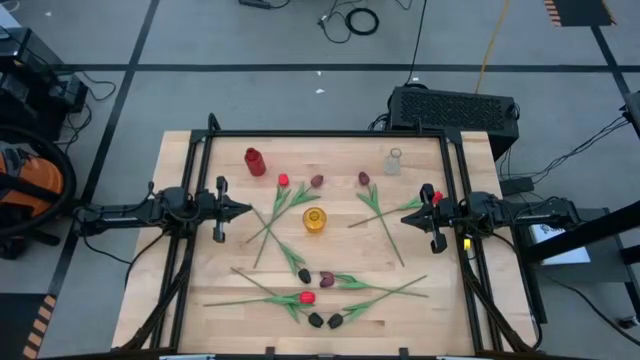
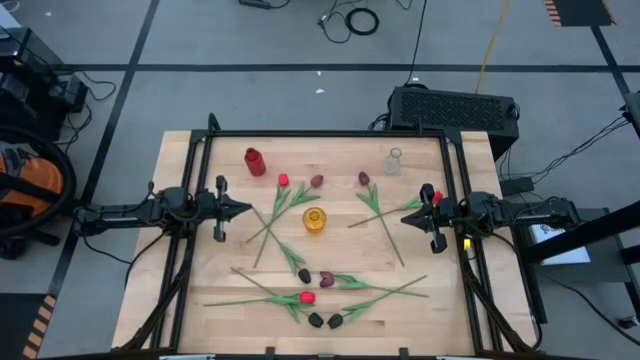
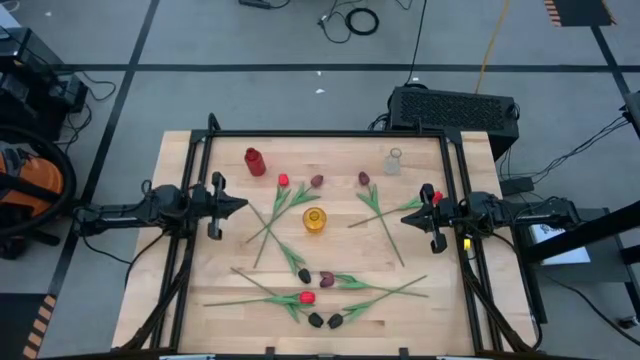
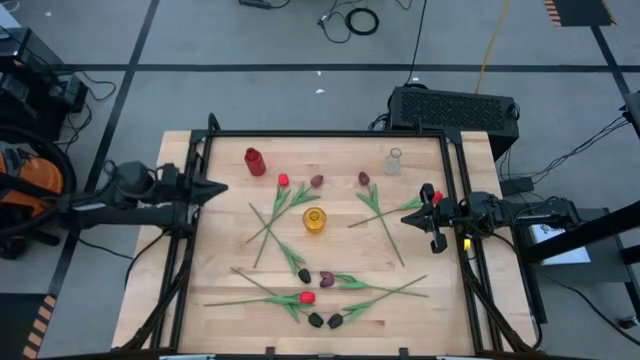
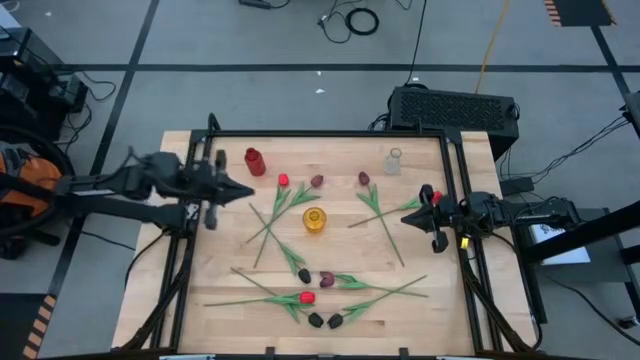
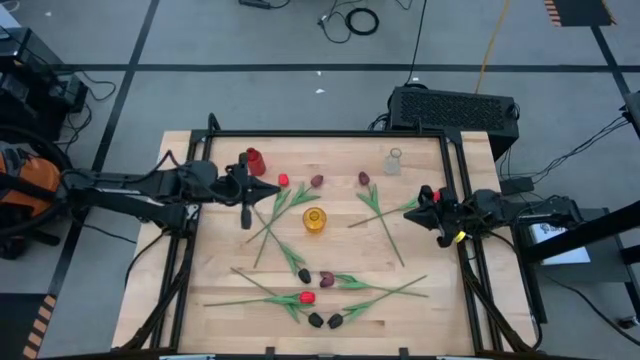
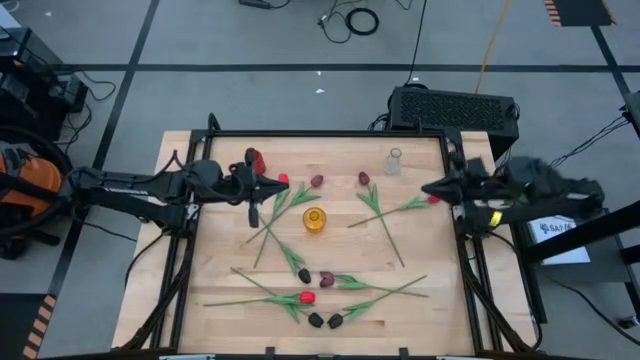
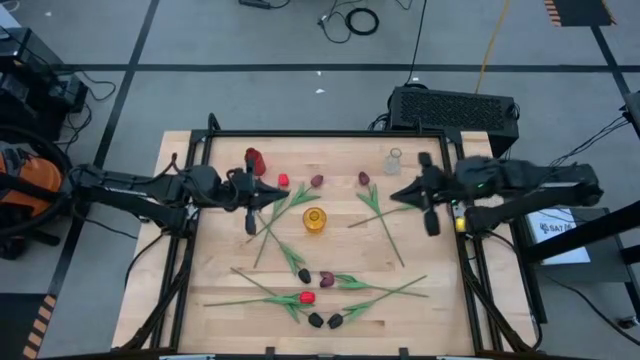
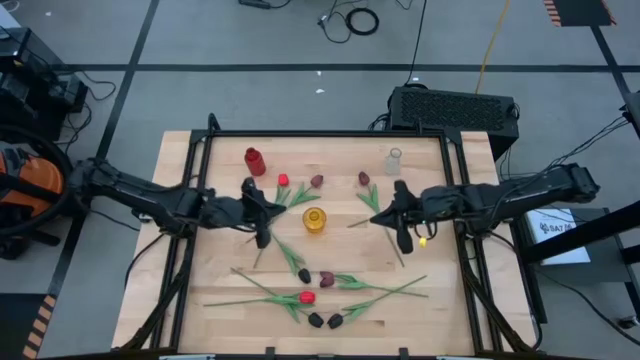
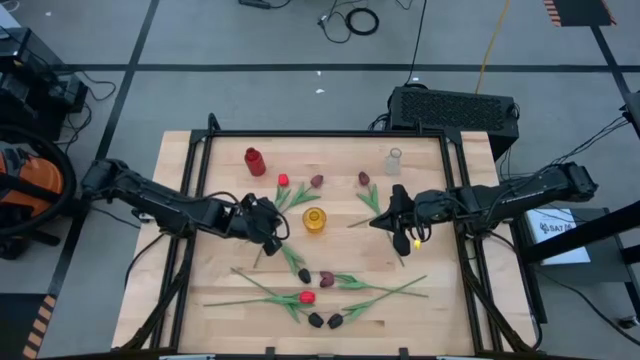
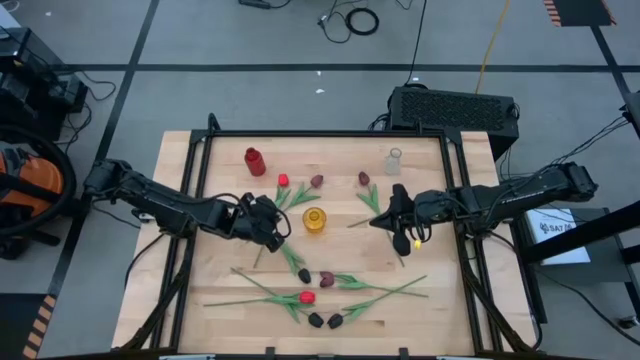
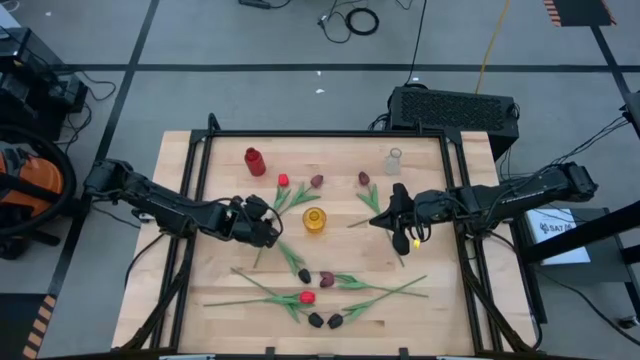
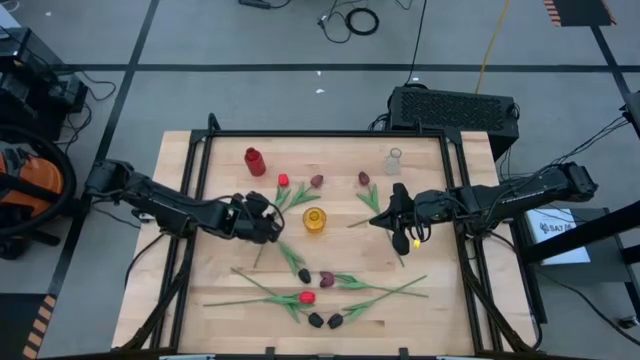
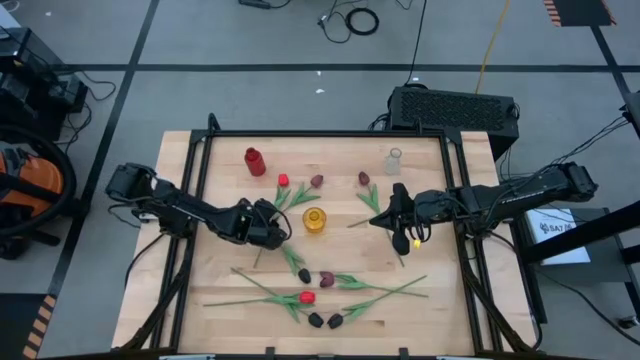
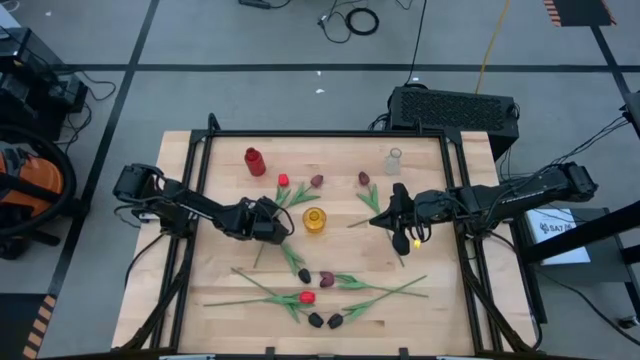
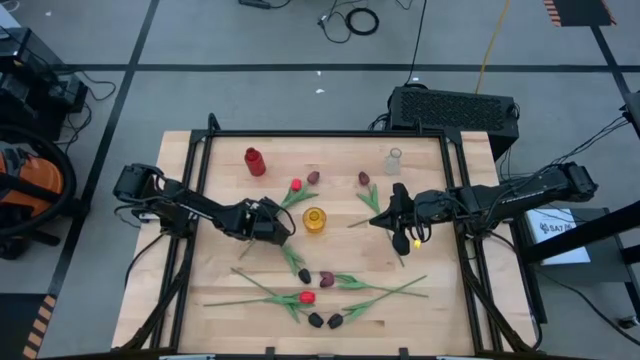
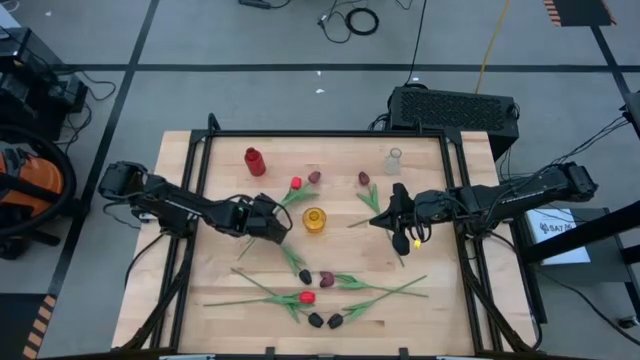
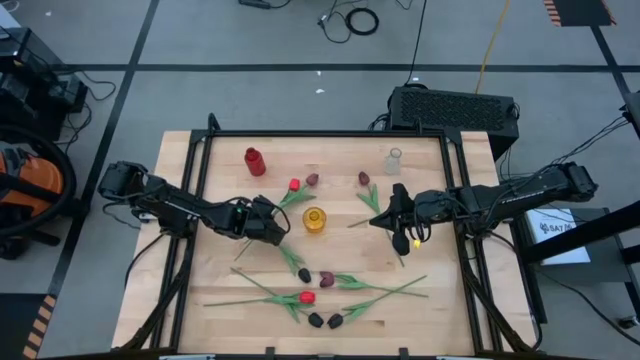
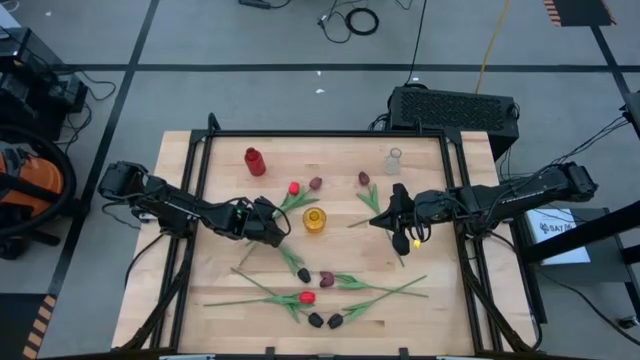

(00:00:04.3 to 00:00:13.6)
Task: Sort flowers into vase by color
Put the top left red flower into the red vase

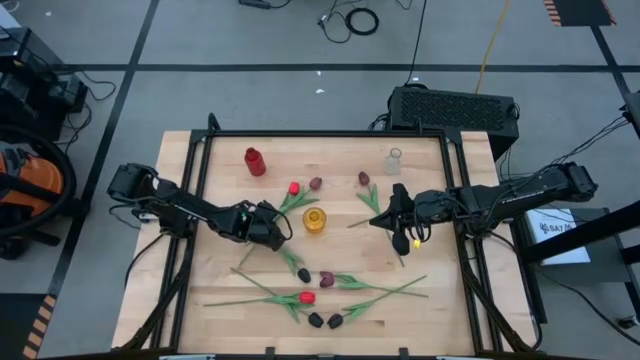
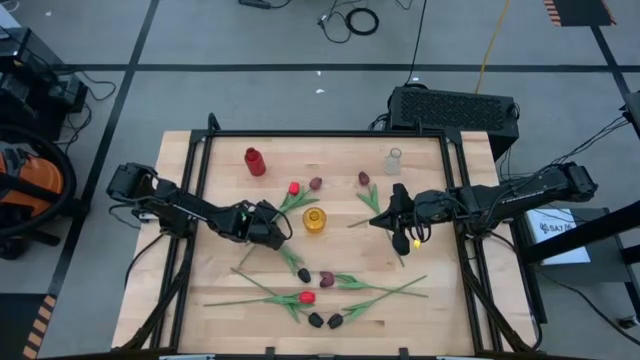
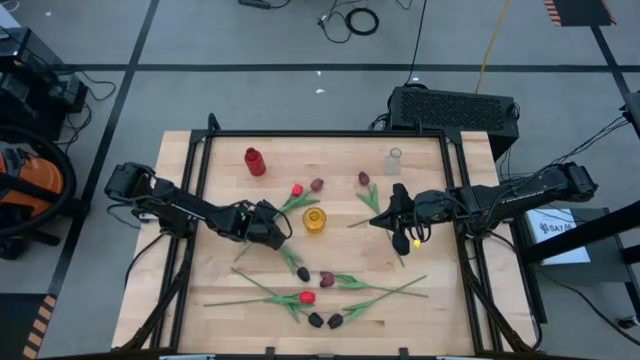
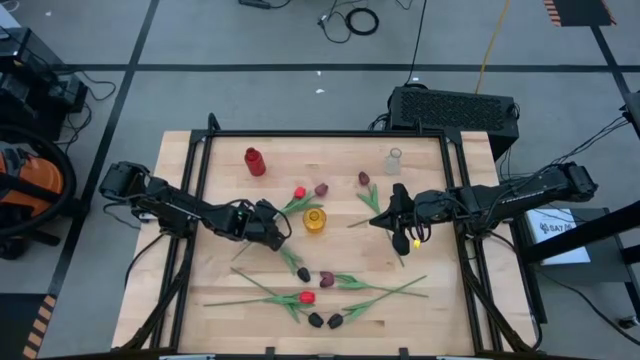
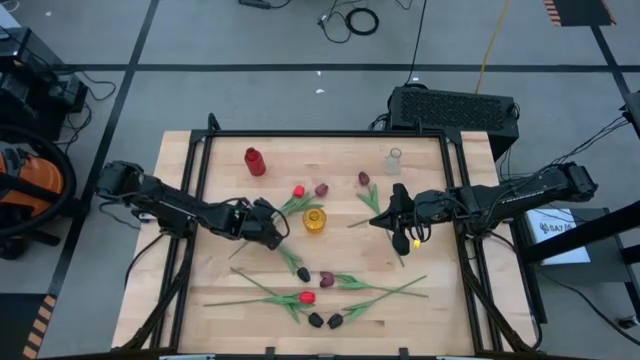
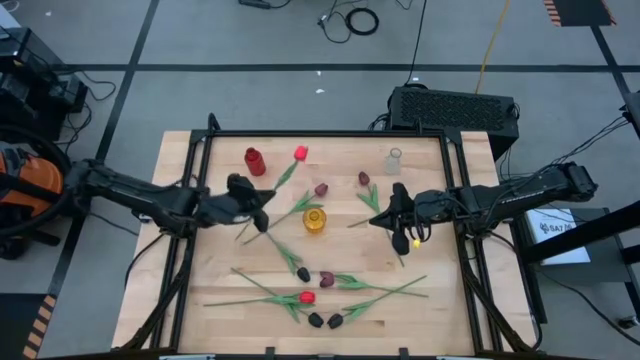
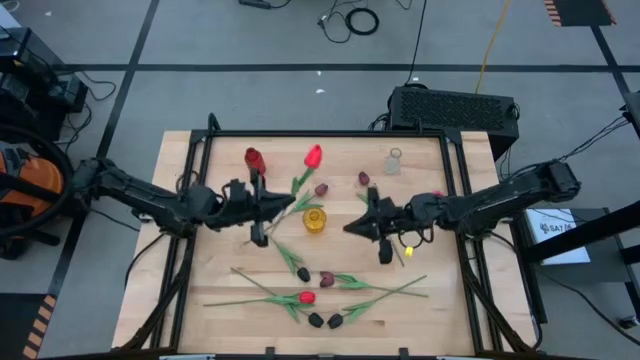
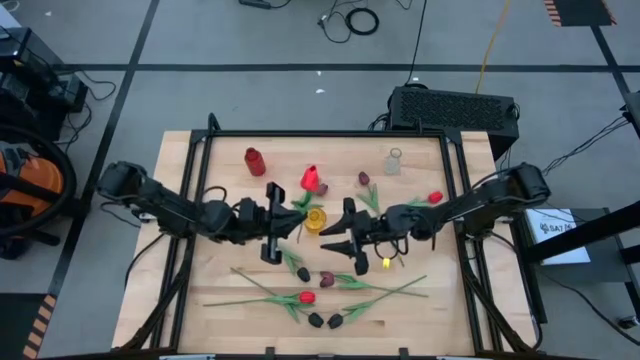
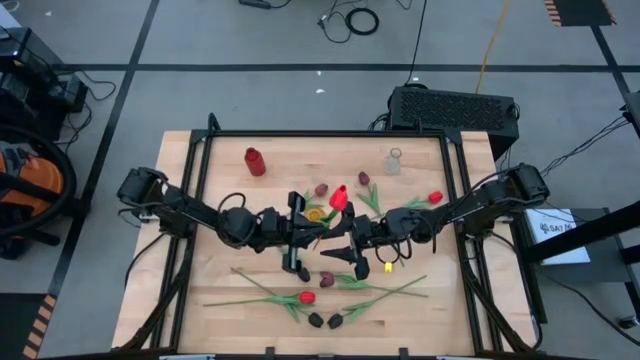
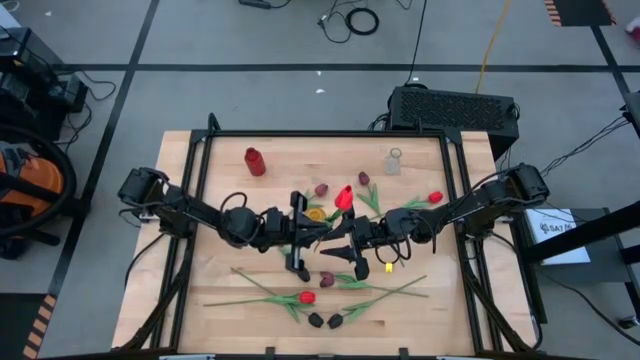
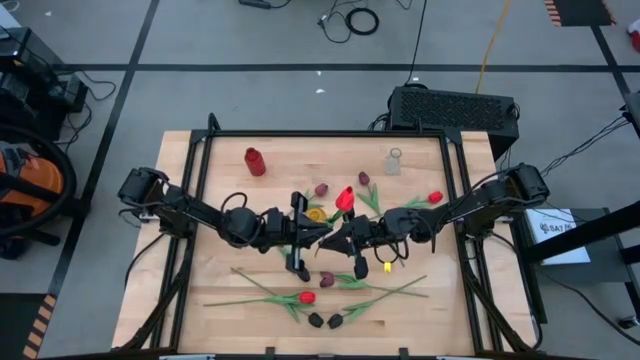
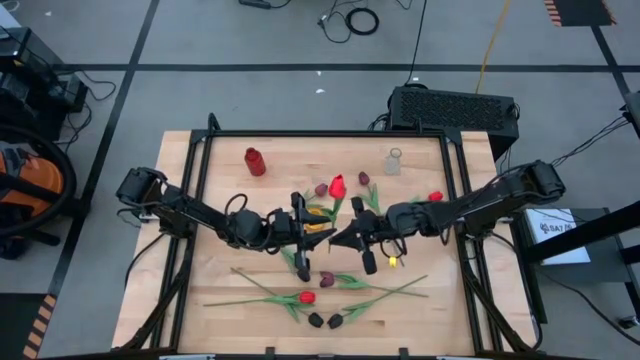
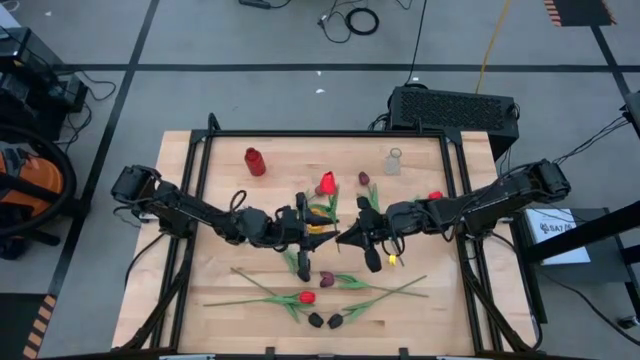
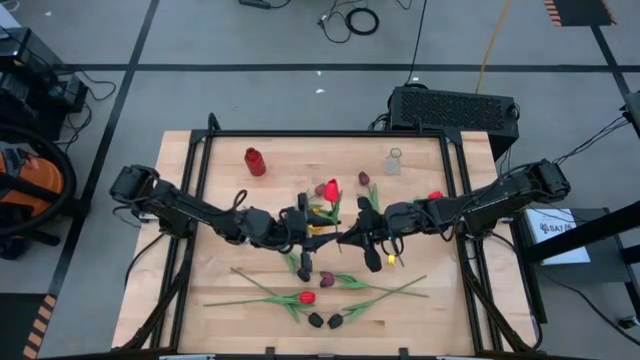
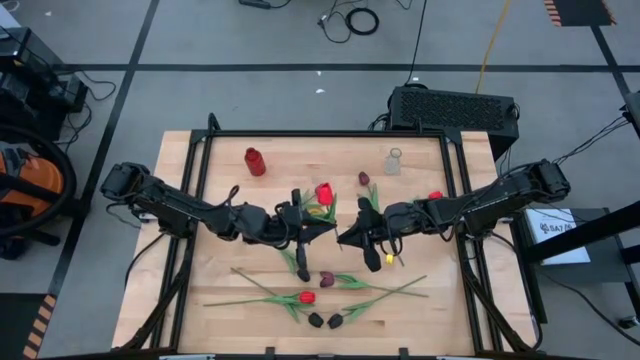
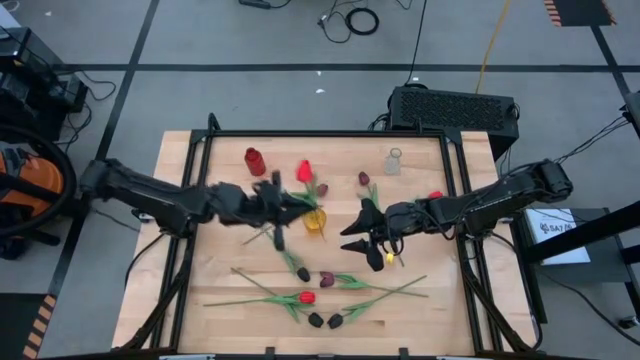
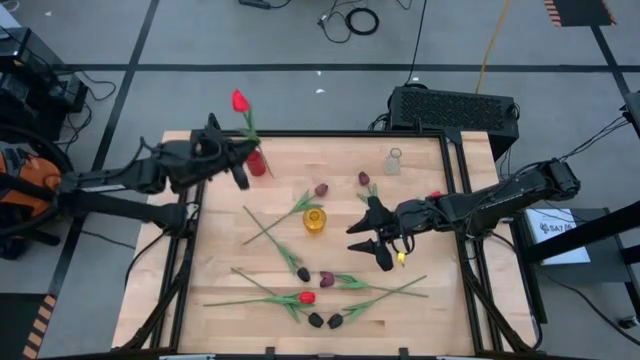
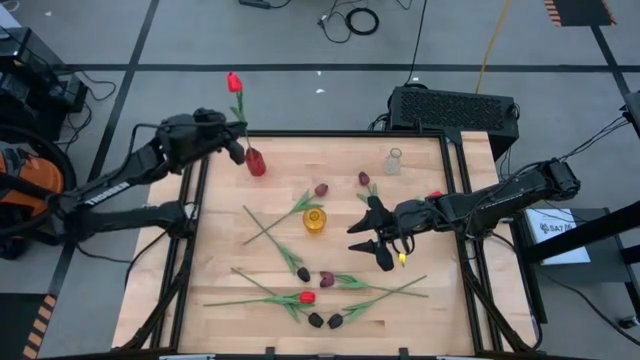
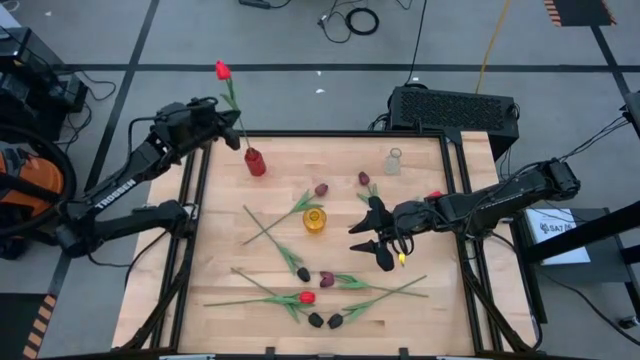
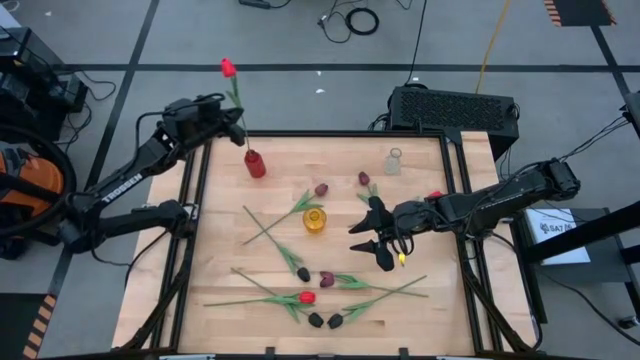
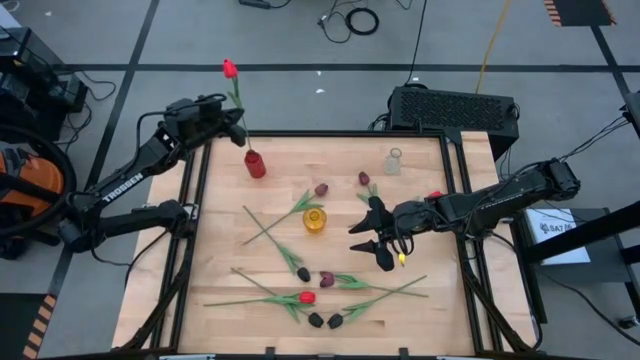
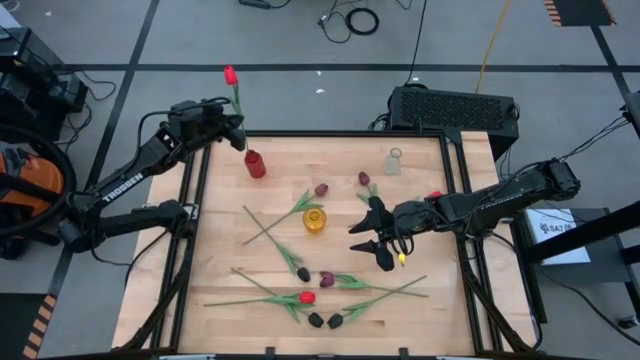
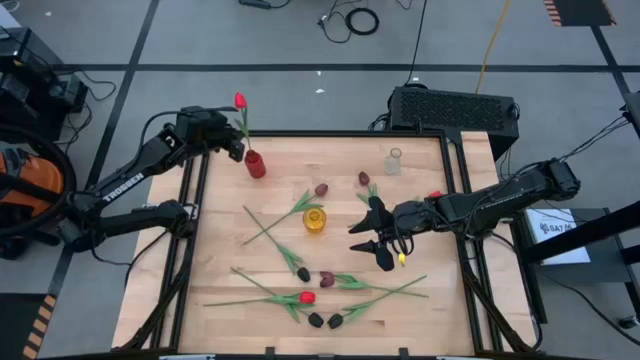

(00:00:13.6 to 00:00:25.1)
Put the top left red flower into the red vase
